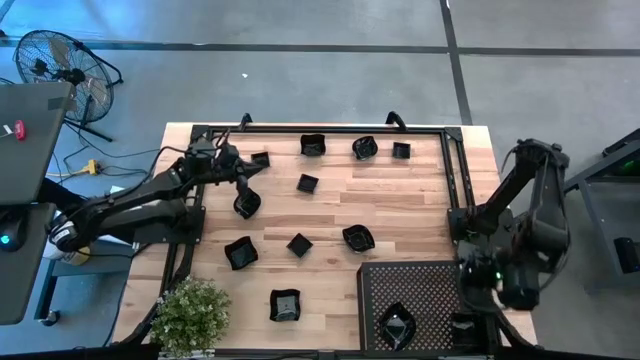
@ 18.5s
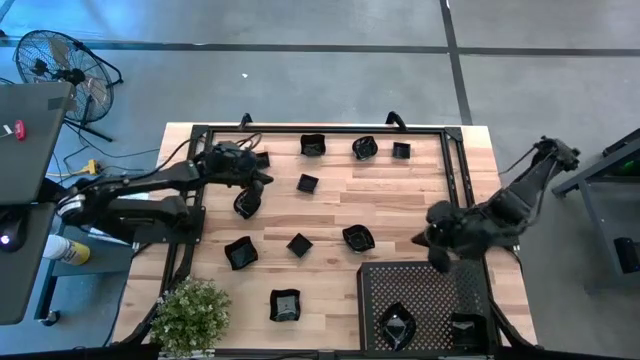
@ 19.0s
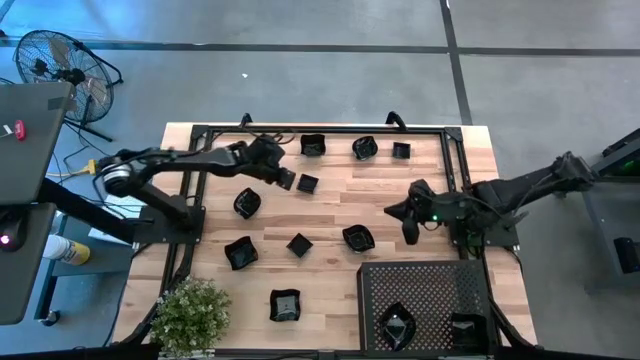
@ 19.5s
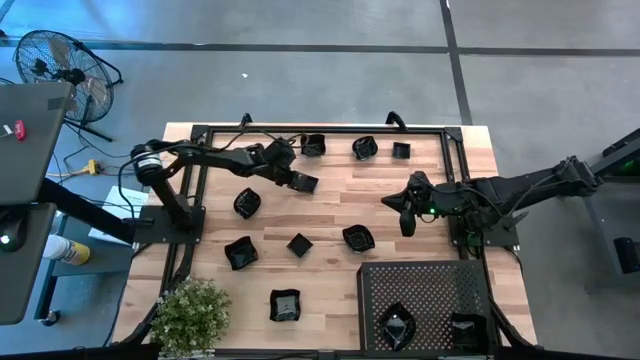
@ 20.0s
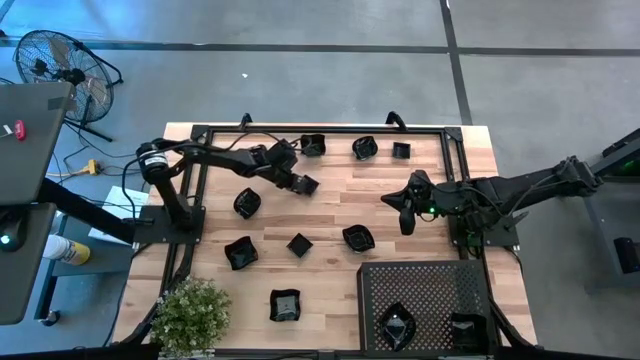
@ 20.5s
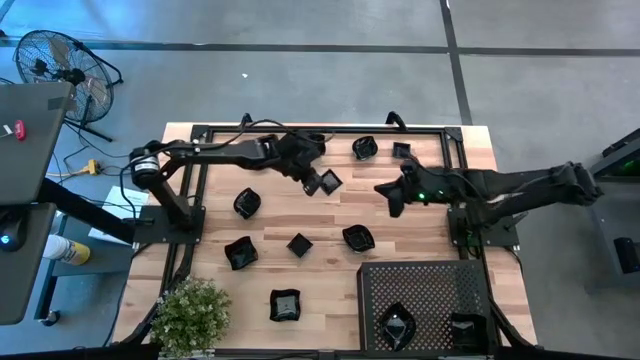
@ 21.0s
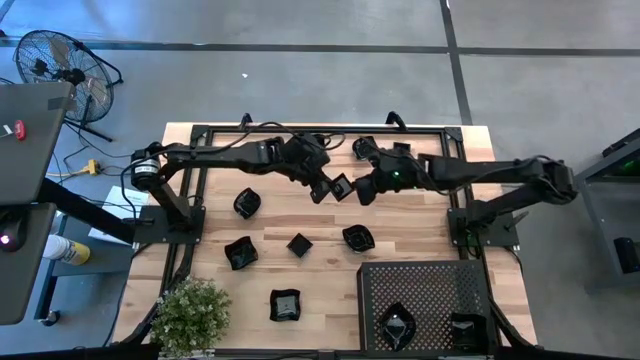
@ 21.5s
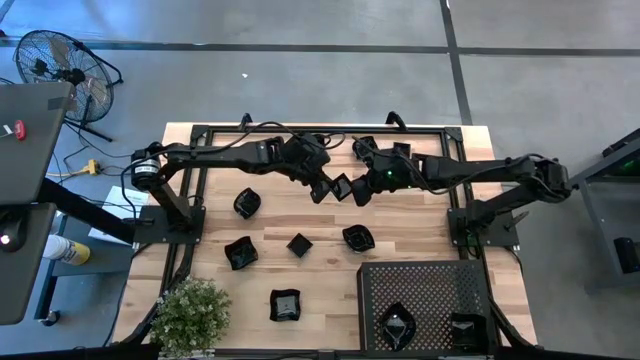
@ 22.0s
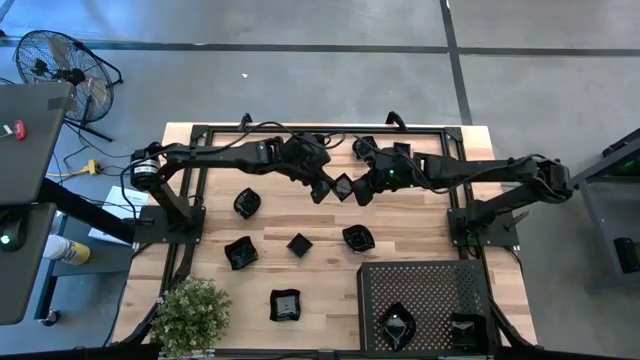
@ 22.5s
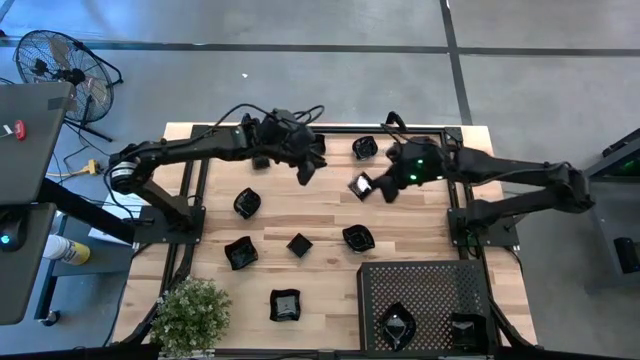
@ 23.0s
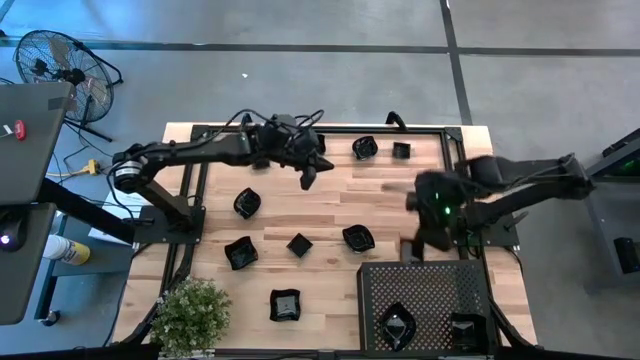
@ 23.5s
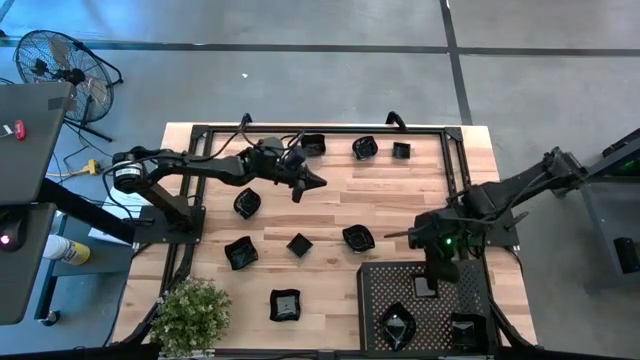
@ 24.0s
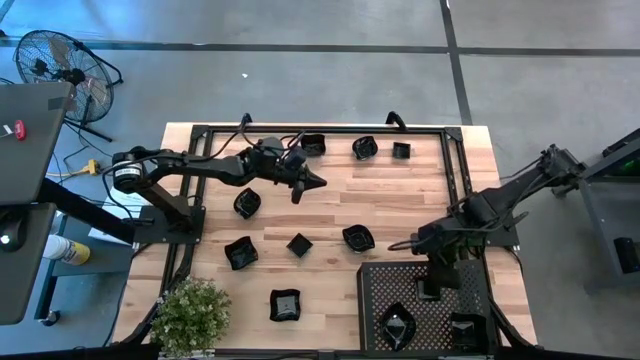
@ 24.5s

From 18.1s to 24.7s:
Task: Pick & Place Mini shaped plates
Put the black square plate on the shelf

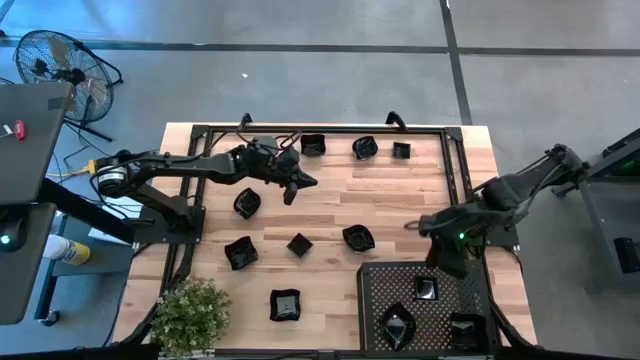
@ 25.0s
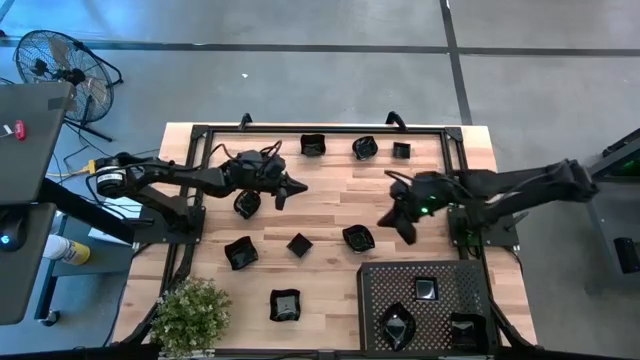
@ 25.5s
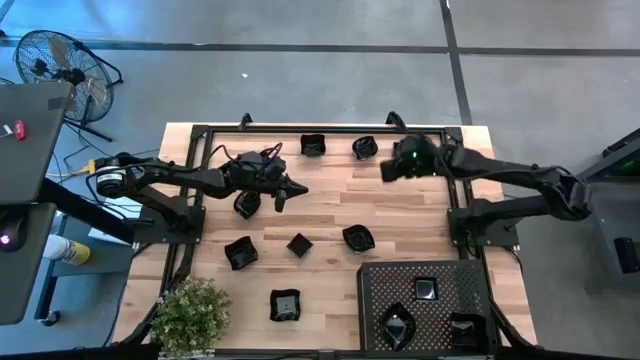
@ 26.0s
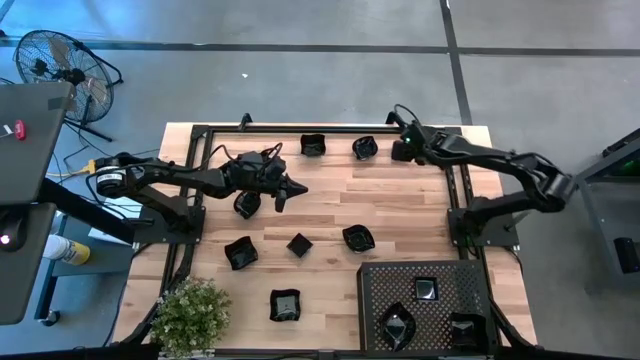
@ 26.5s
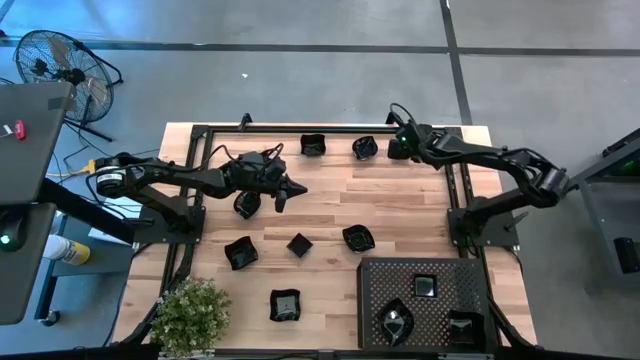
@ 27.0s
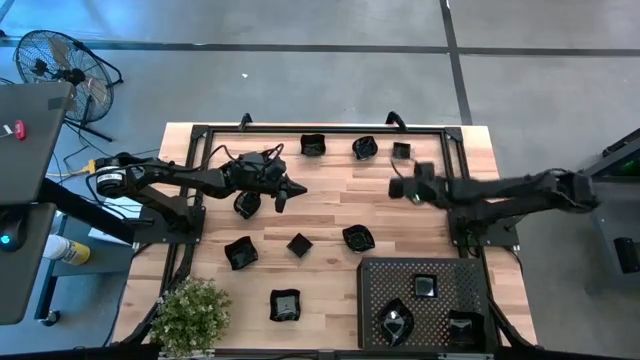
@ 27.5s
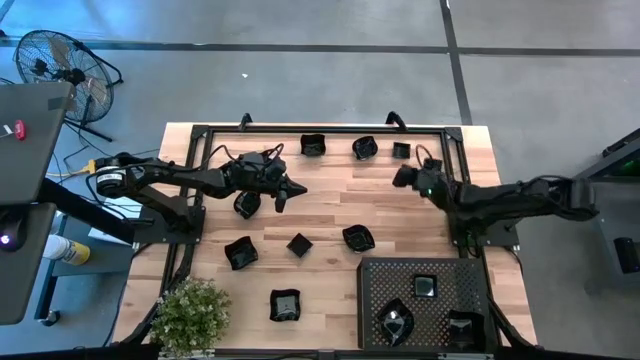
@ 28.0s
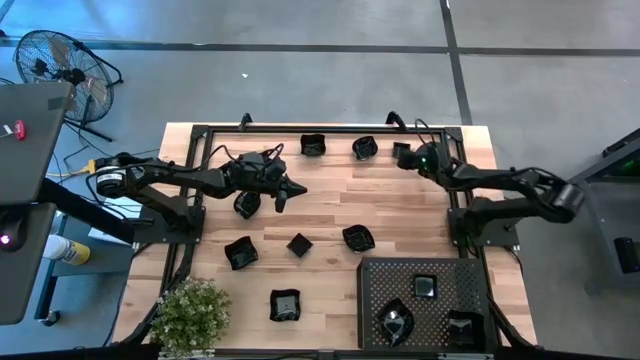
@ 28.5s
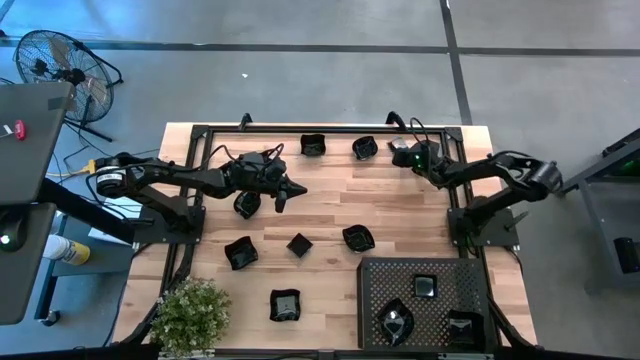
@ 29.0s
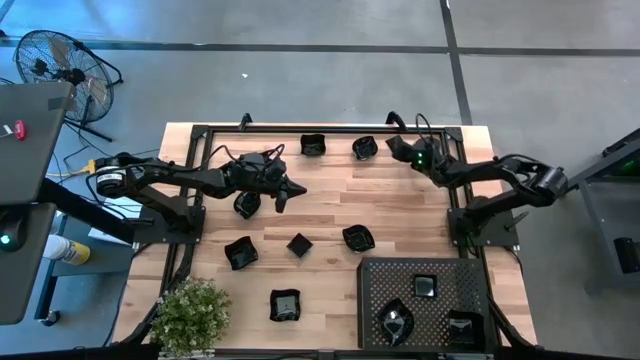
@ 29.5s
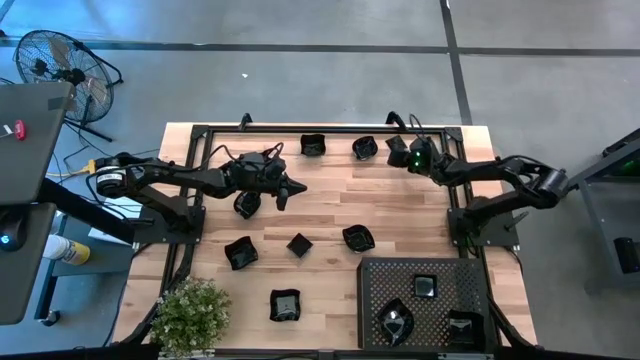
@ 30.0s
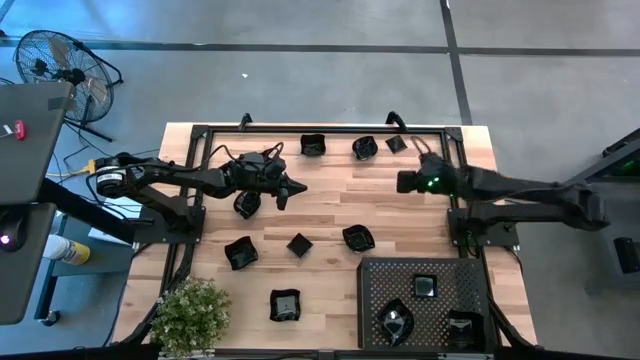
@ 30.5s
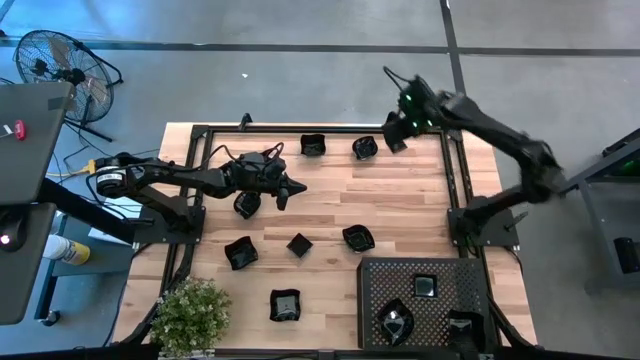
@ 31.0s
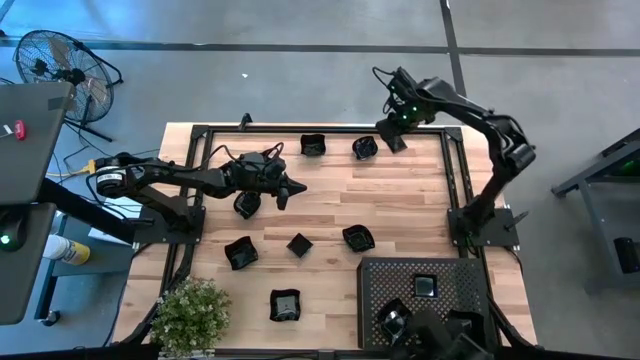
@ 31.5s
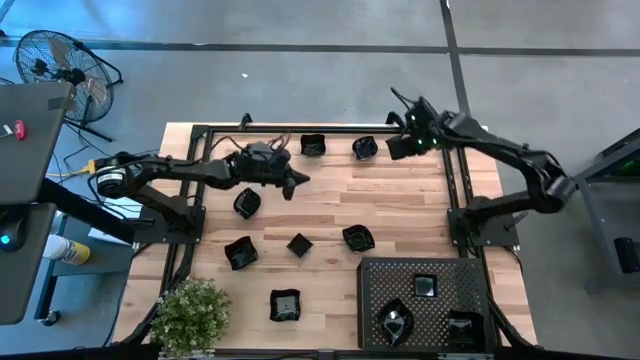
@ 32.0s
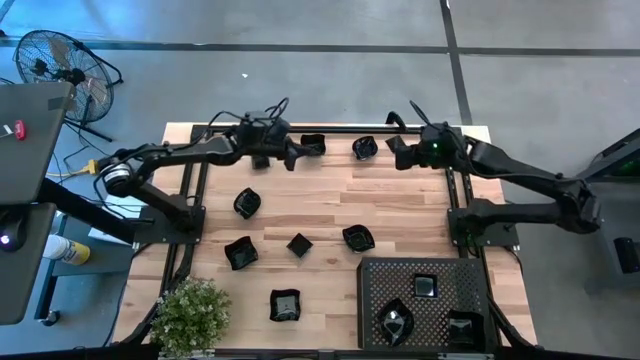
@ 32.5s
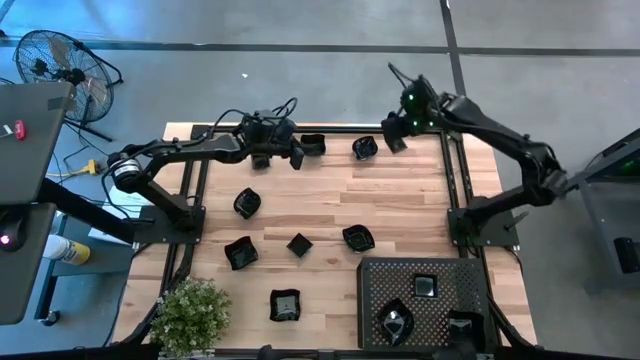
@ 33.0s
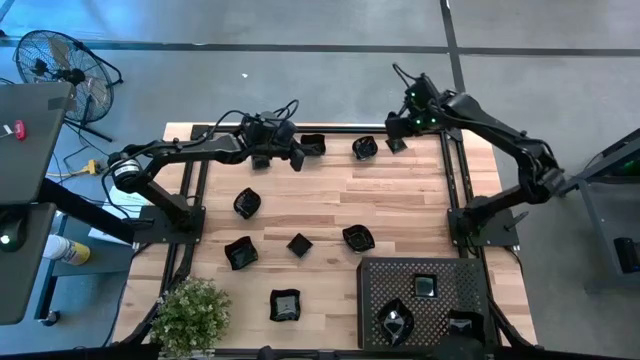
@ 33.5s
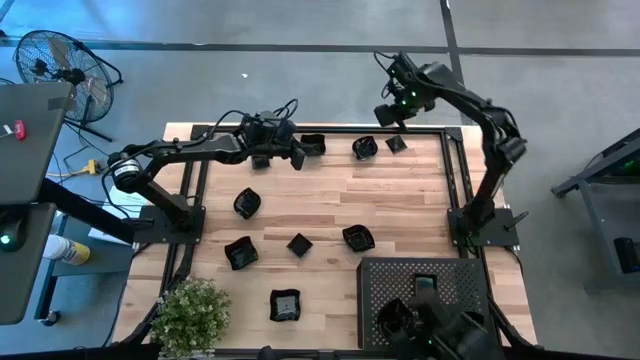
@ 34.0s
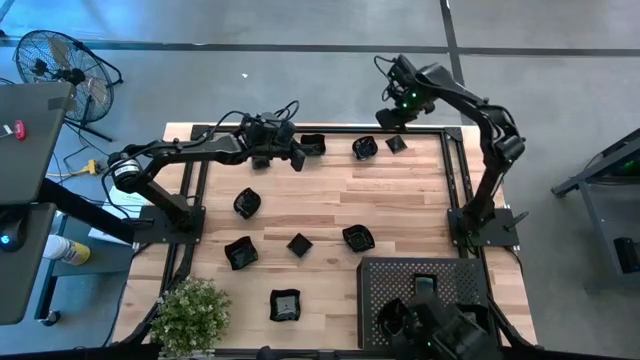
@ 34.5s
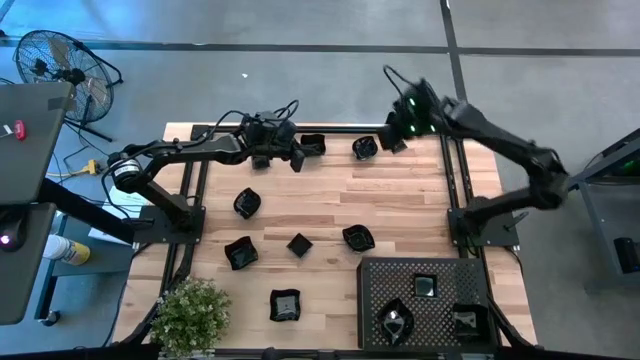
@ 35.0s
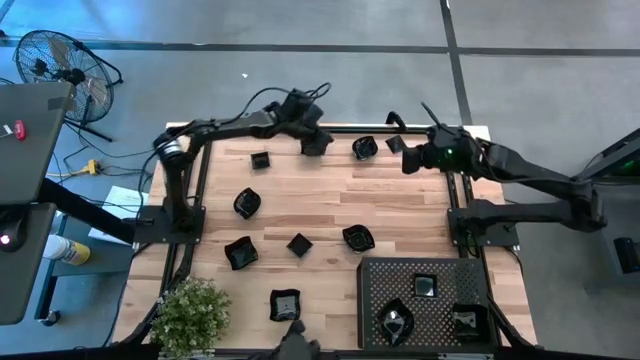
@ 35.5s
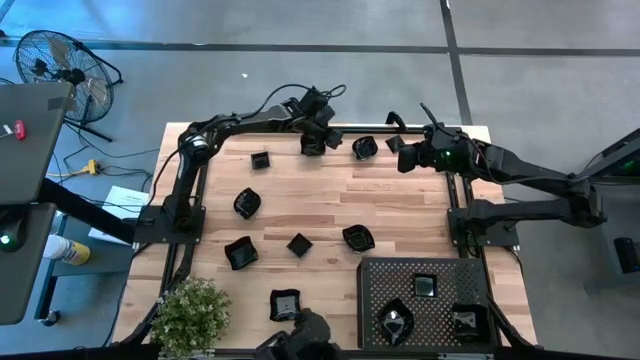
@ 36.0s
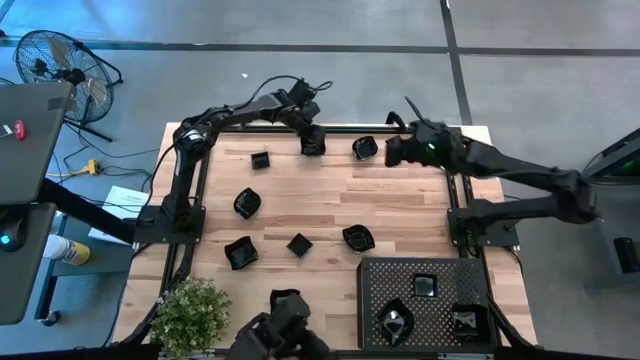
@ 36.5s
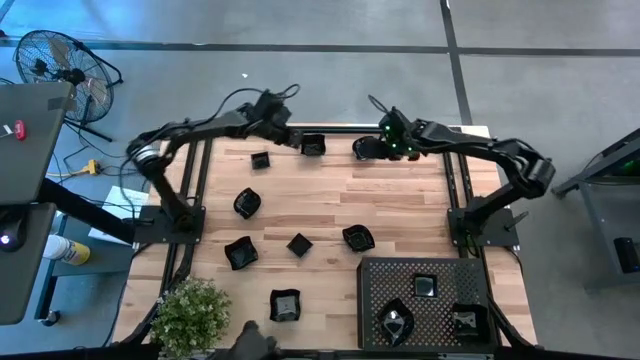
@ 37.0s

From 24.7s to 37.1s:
Stack the black square plate on top of the black square plate on the shelf

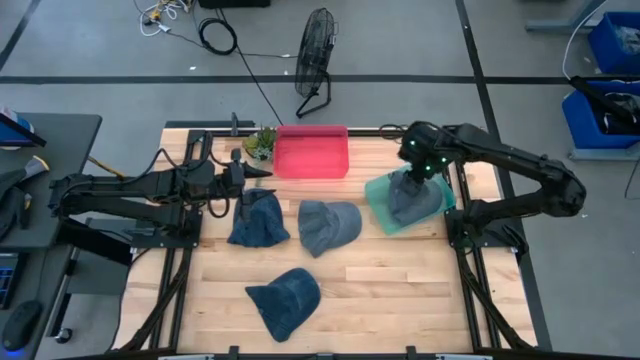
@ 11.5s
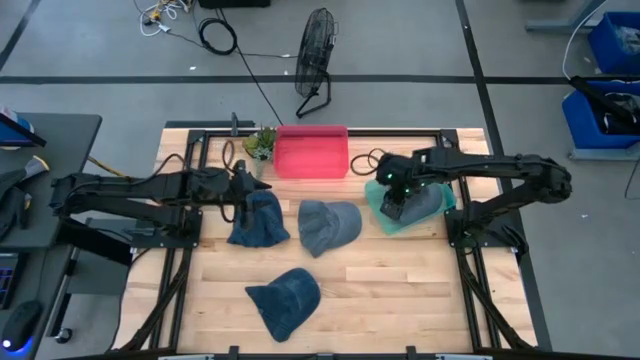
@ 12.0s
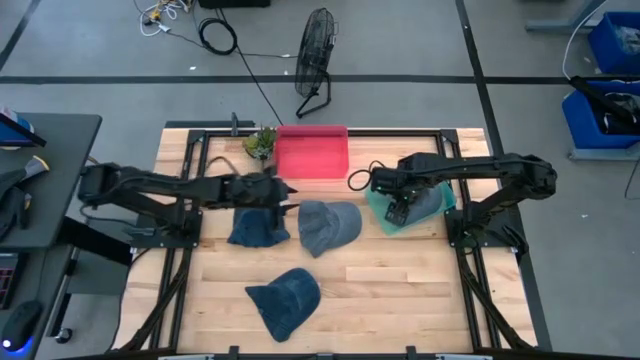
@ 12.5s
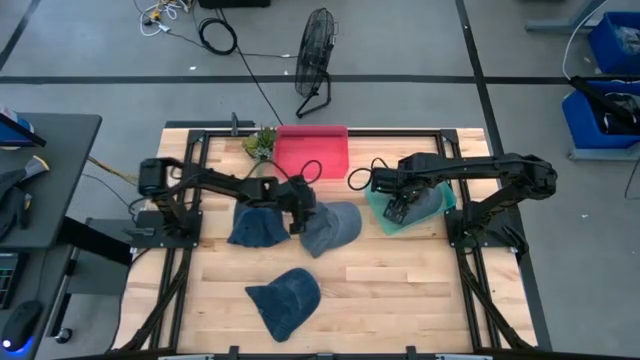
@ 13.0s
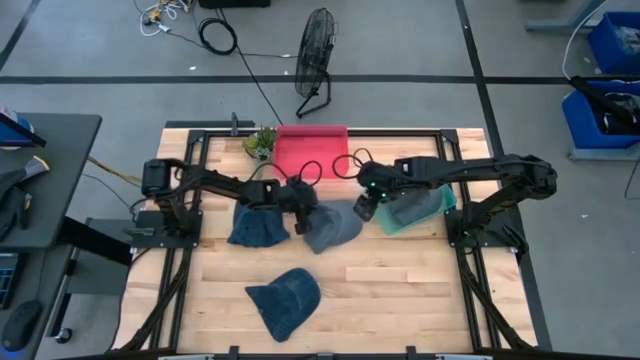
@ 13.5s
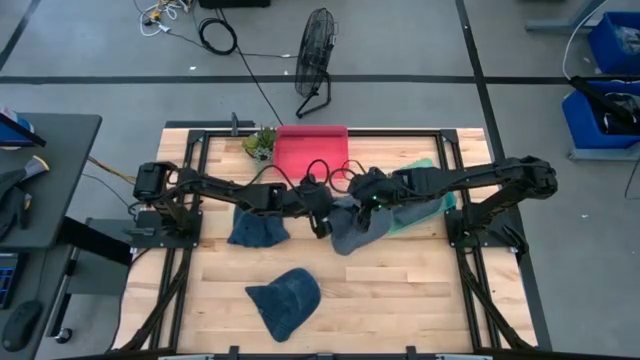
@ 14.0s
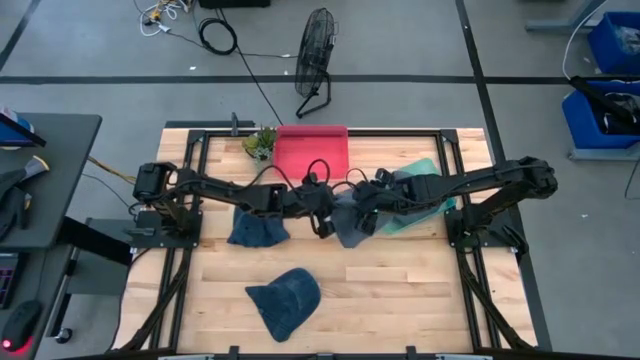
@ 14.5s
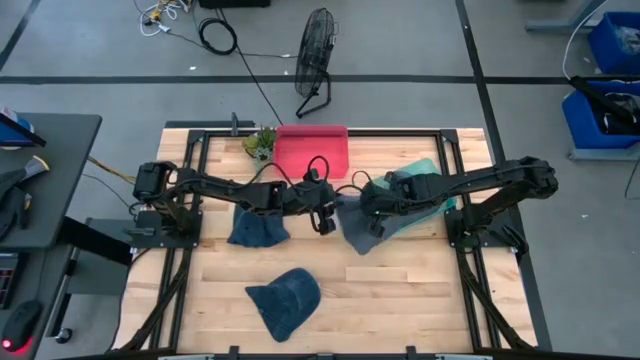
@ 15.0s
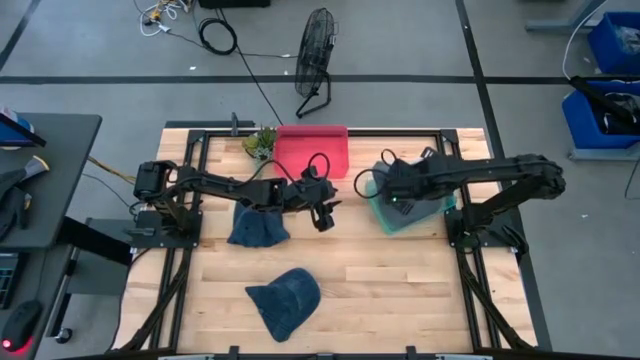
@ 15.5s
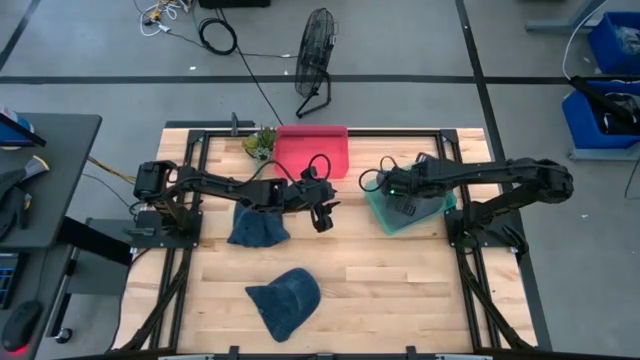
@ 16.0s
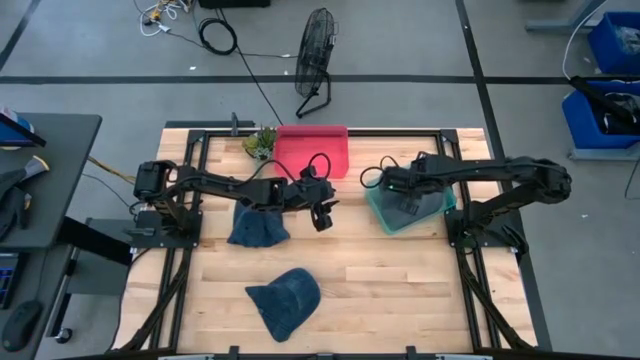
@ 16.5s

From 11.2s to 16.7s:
Task: Pick & Place hat
Put the gray cap into the green bin
